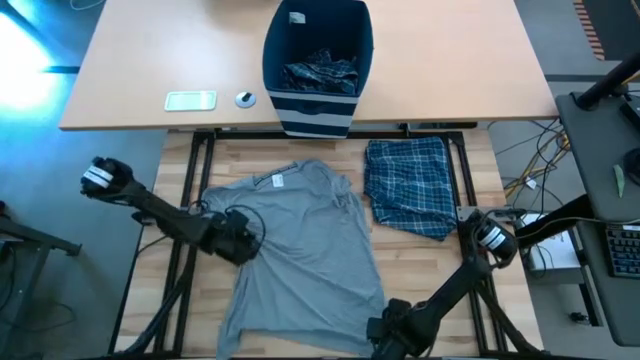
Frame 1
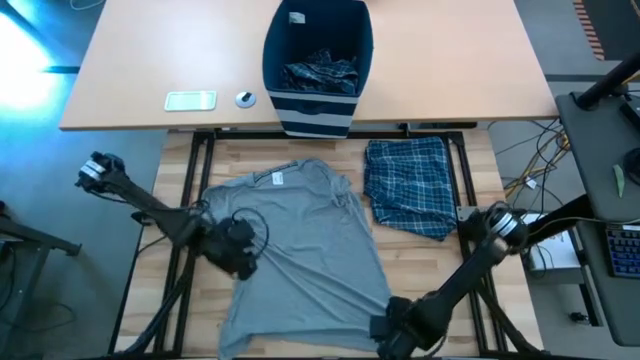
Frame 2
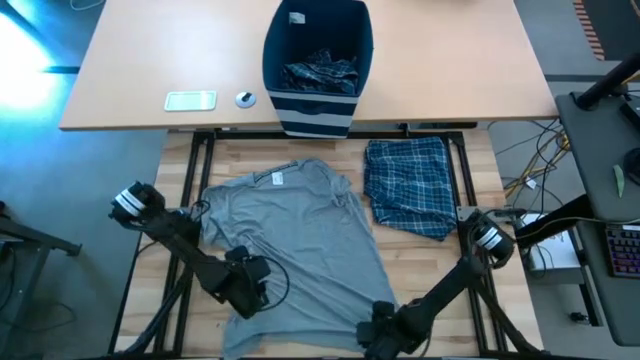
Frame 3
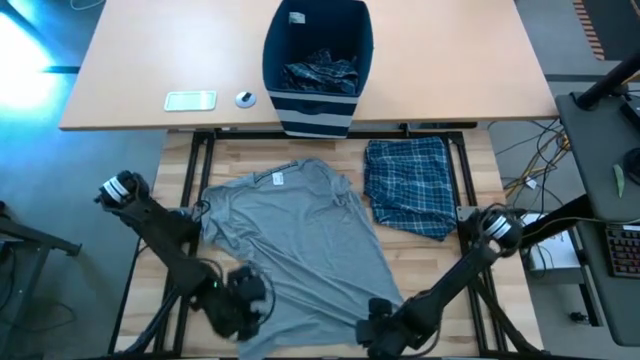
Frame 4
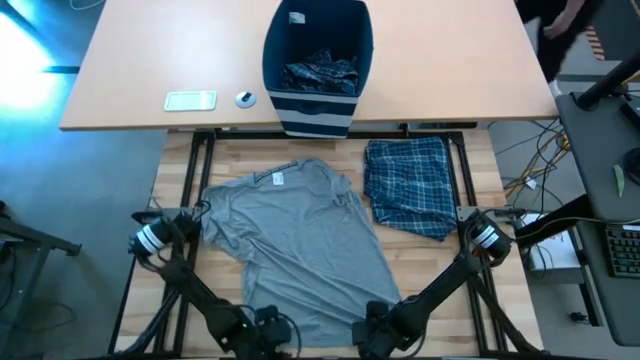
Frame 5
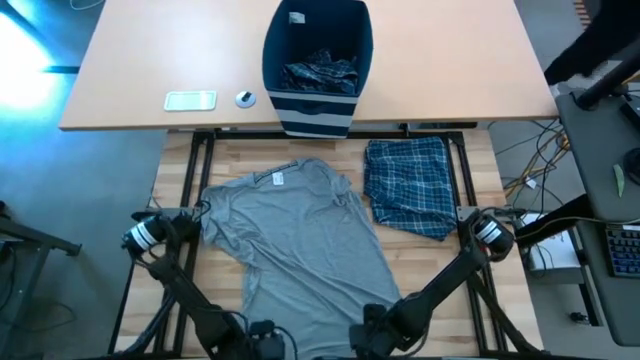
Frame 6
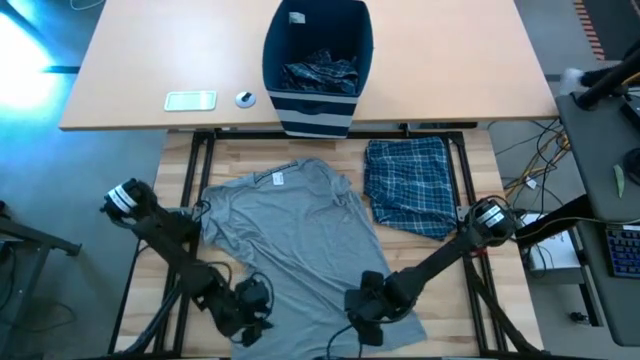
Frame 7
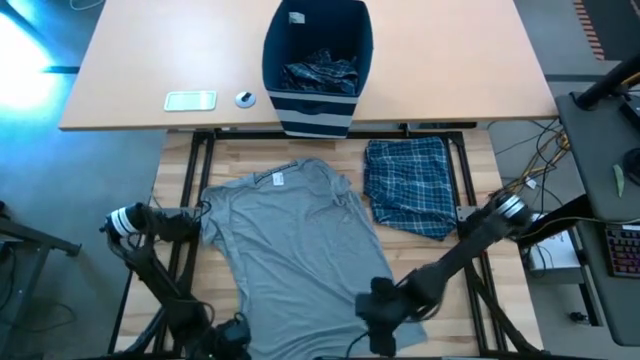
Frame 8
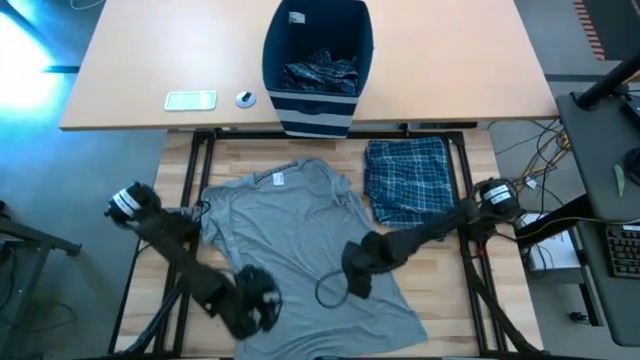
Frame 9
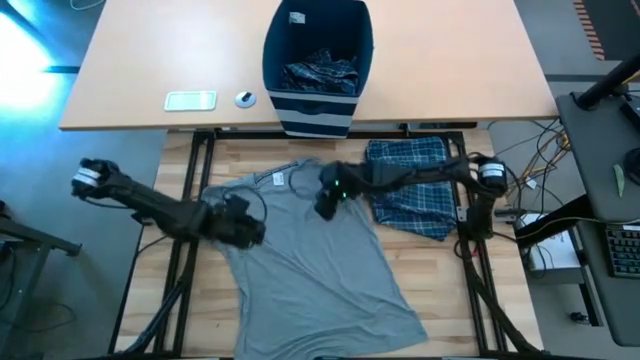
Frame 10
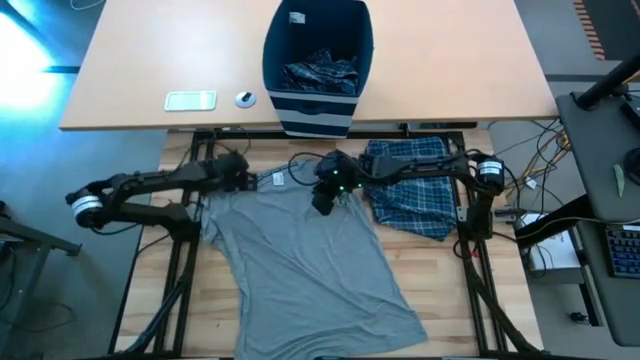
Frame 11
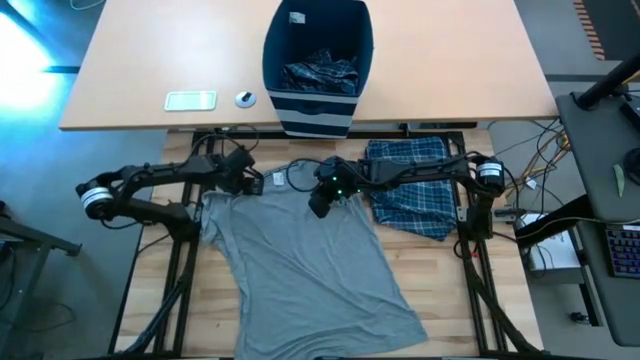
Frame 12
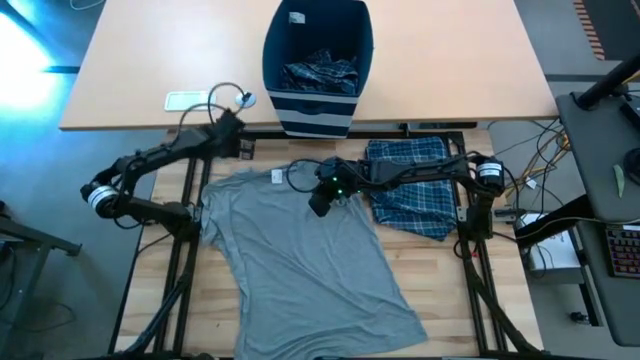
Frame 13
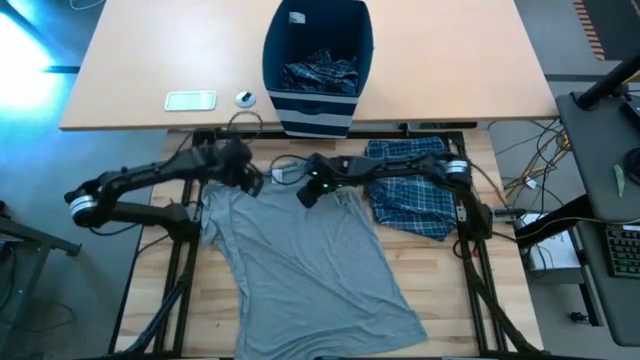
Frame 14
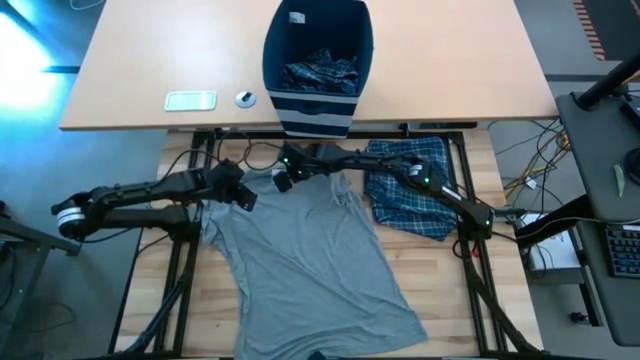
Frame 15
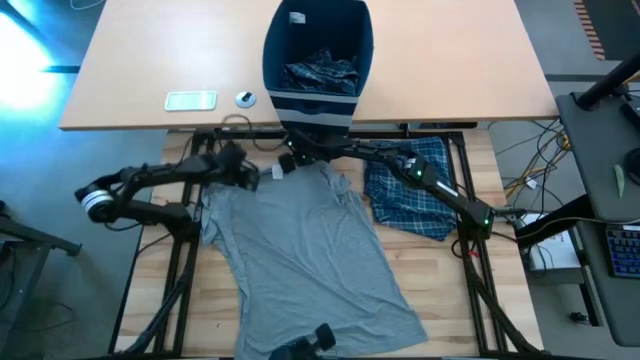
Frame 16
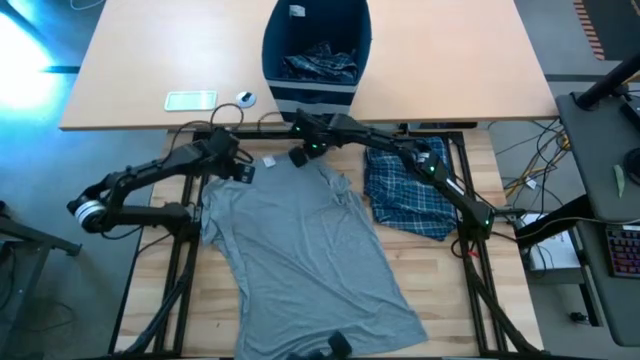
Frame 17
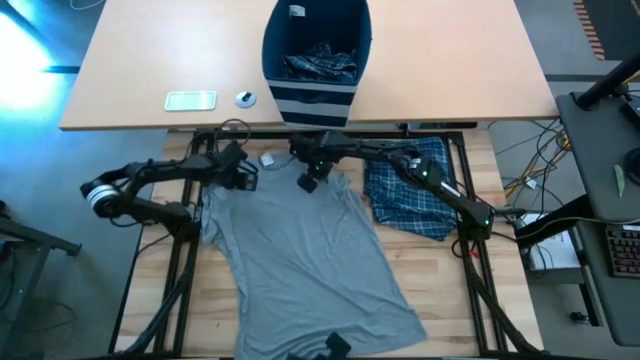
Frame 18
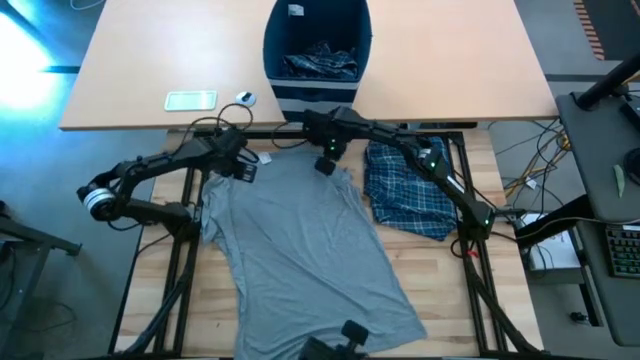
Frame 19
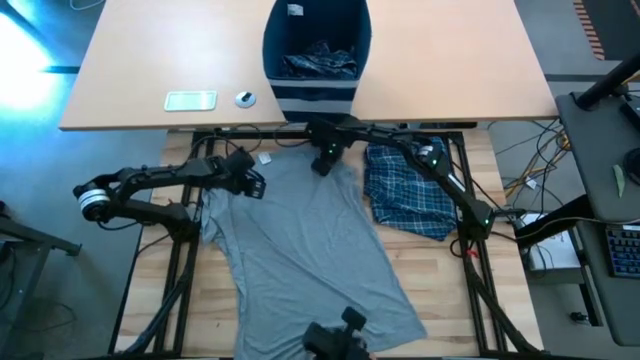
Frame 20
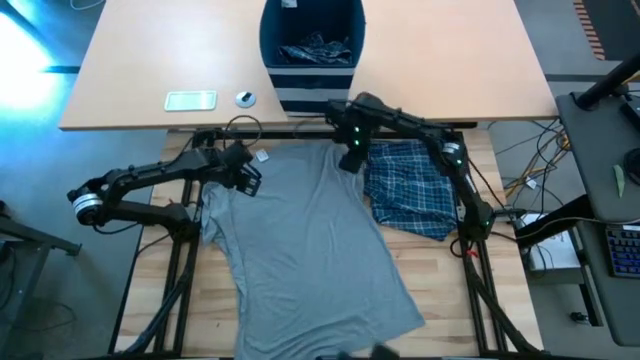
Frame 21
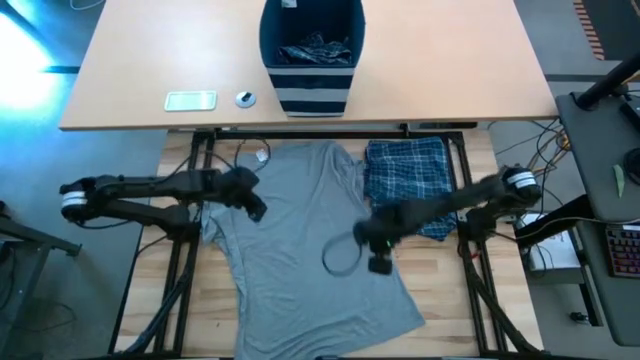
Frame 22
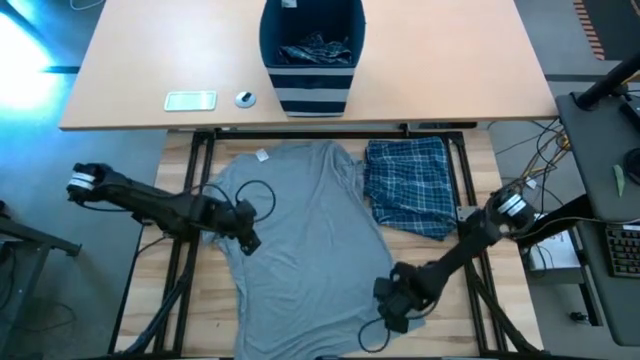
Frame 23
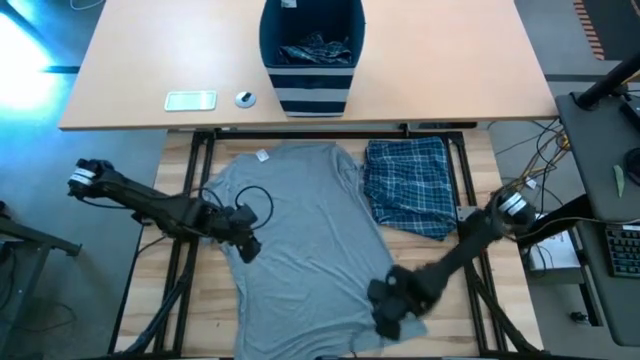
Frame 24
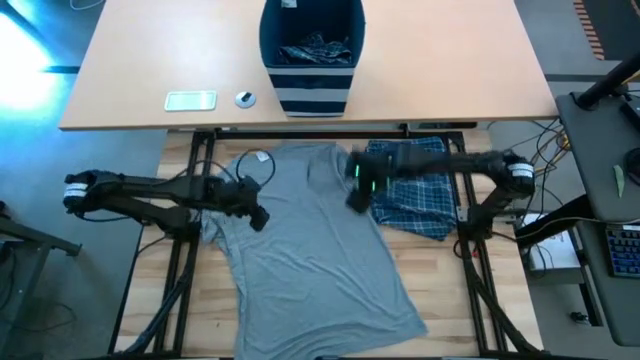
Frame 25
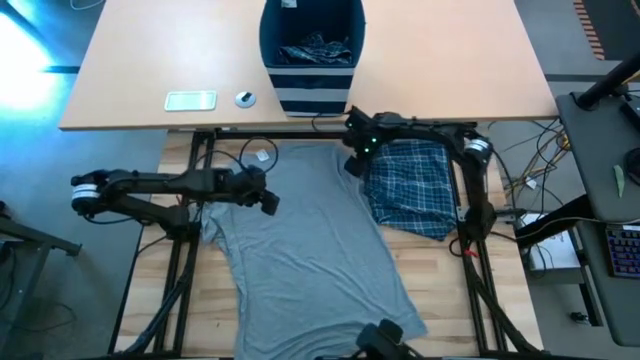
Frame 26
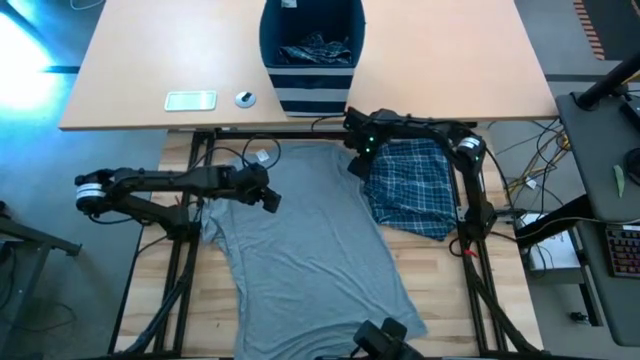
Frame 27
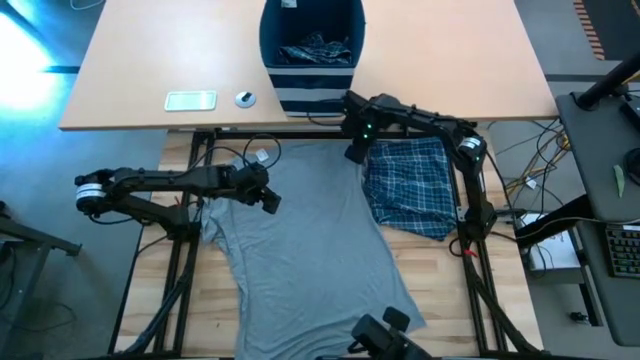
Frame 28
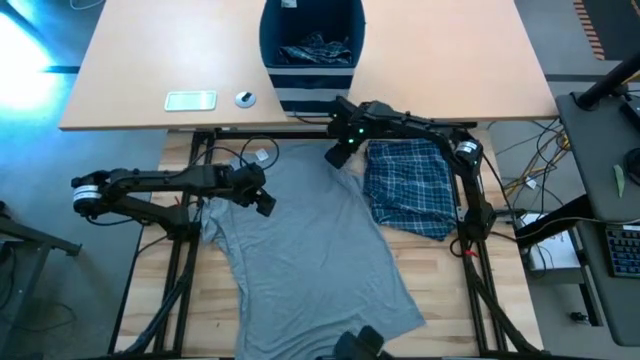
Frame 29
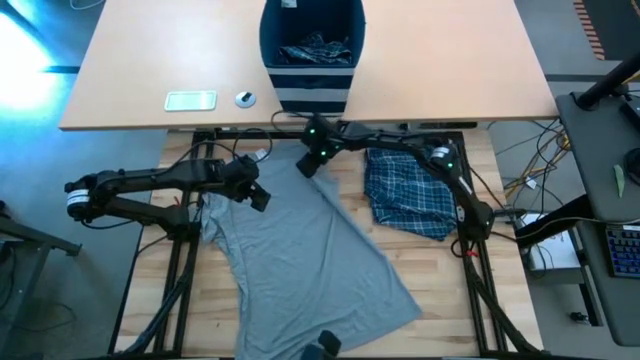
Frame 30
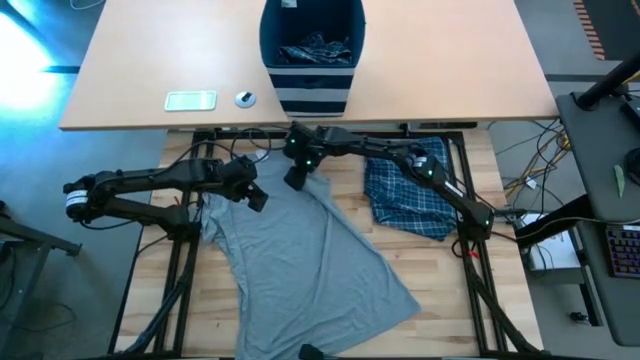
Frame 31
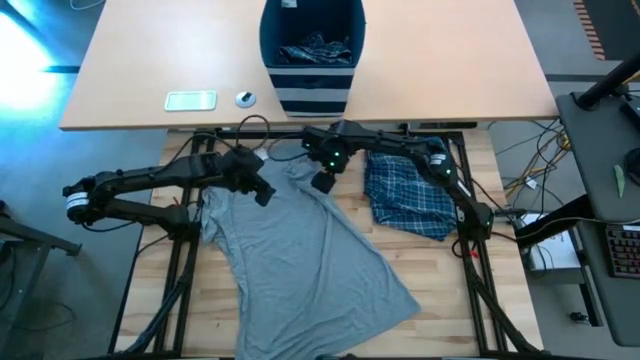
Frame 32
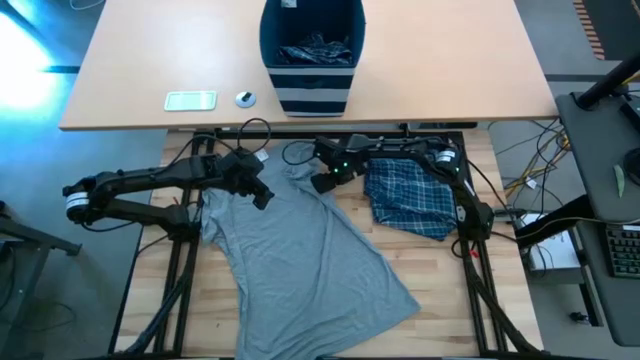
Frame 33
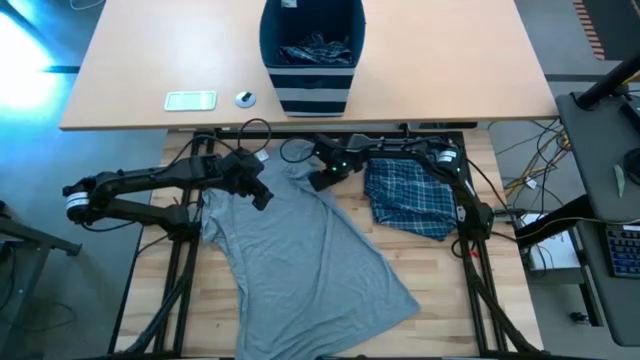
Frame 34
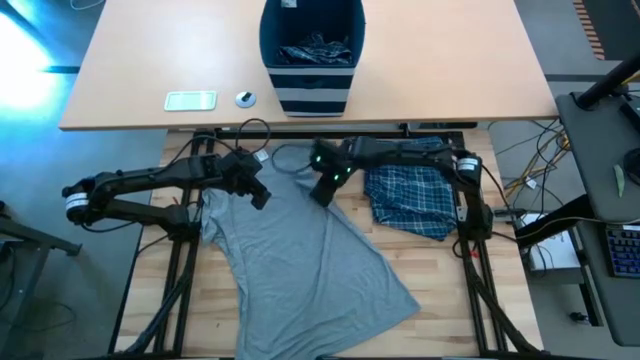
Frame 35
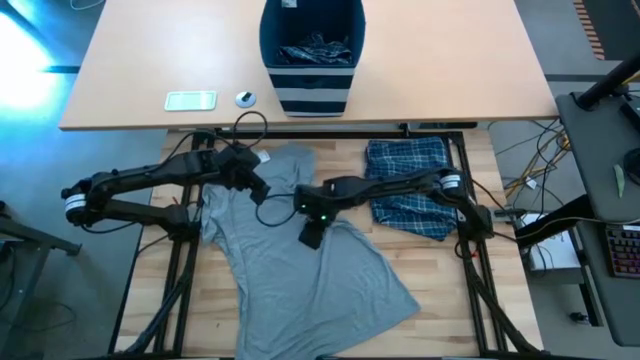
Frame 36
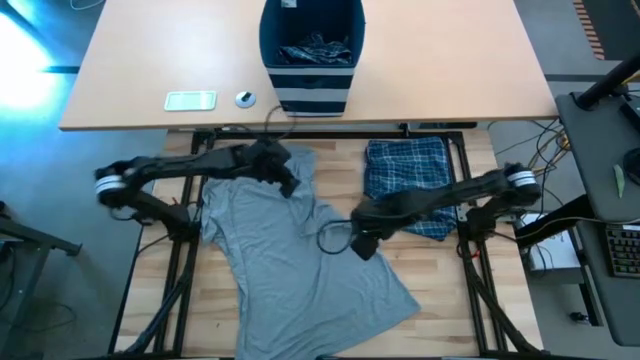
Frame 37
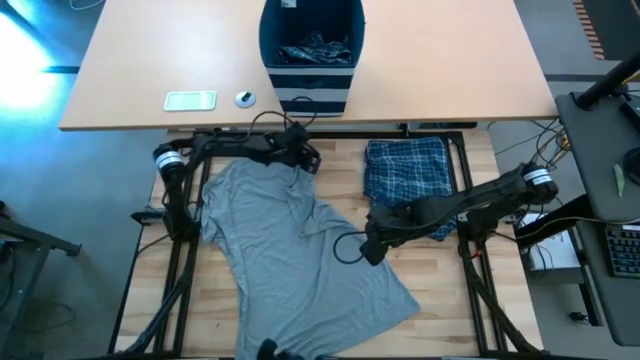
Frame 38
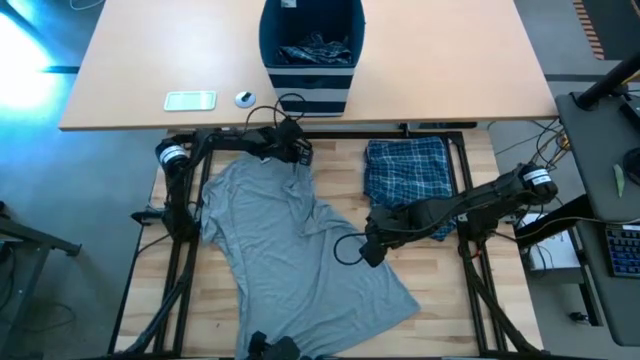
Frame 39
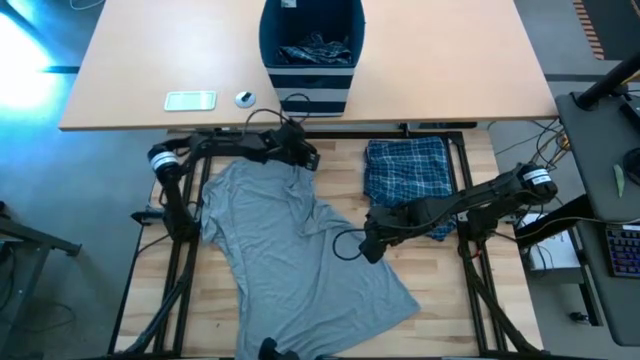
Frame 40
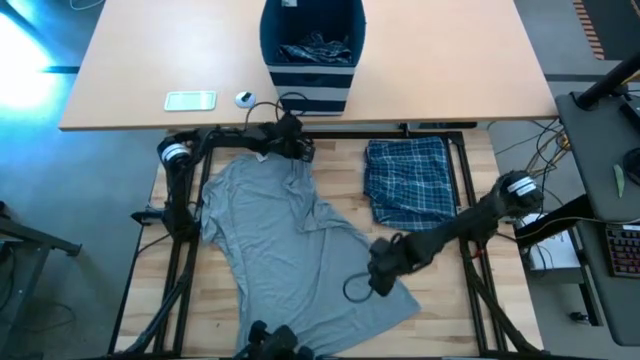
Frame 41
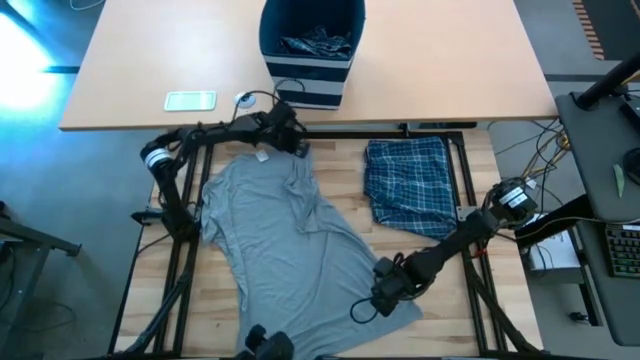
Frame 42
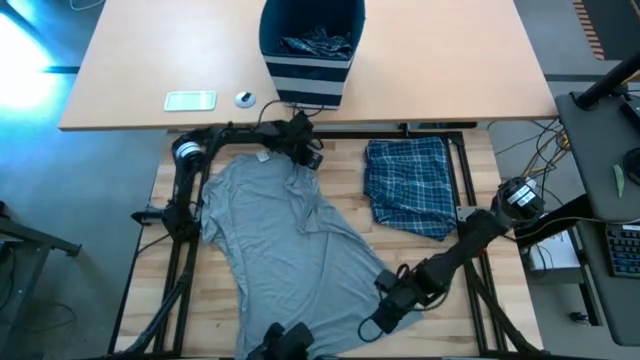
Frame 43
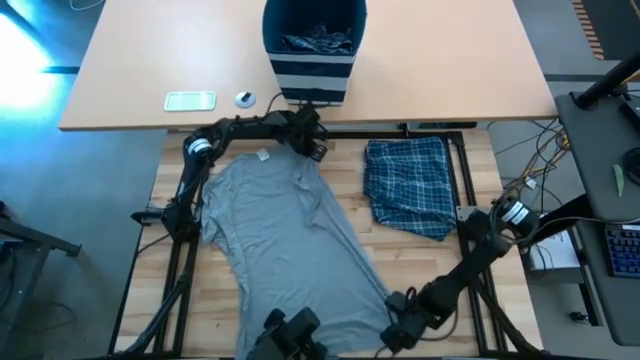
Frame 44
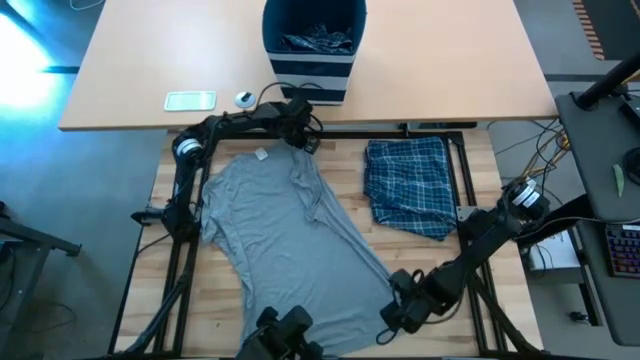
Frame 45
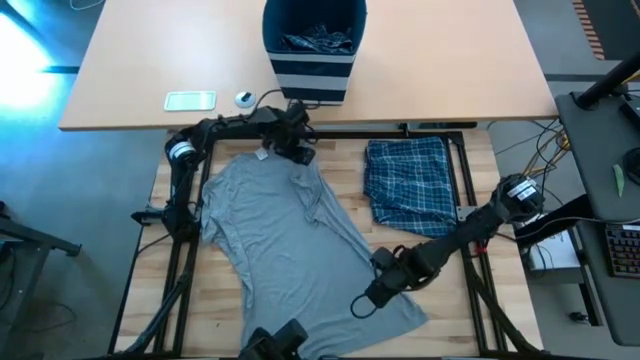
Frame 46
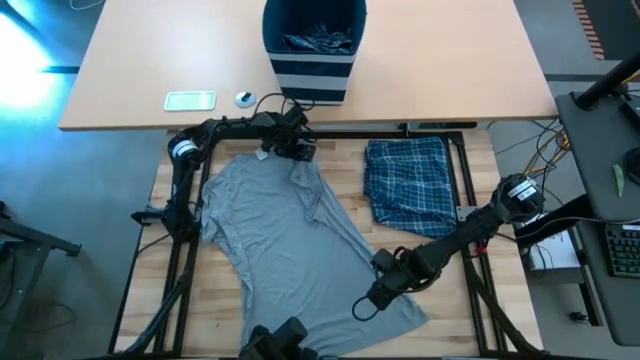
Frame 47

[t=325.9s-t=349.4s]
Task: Fold Laundry from Bin
Fold the gray shirt
